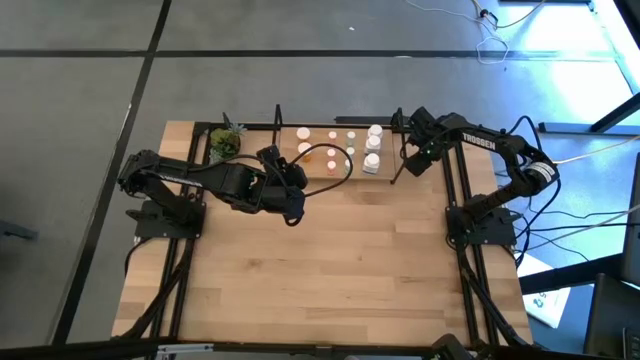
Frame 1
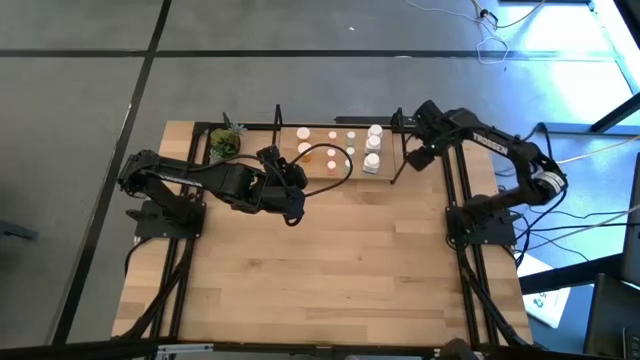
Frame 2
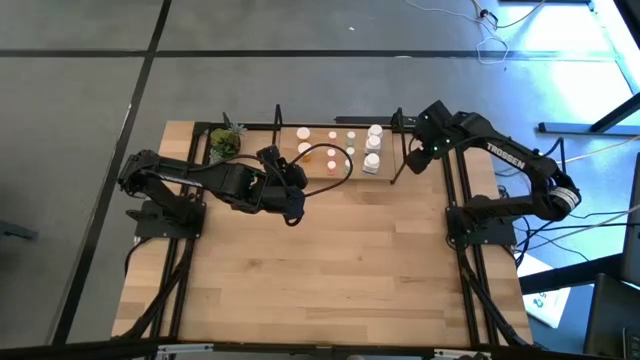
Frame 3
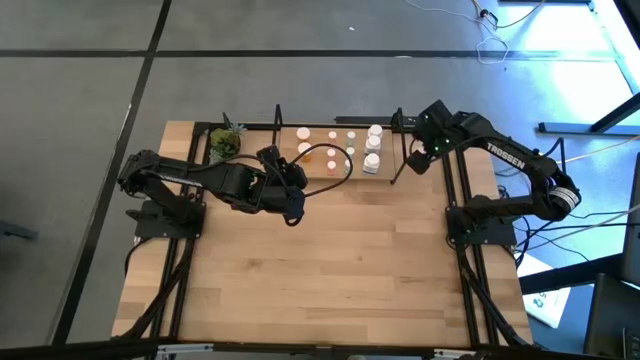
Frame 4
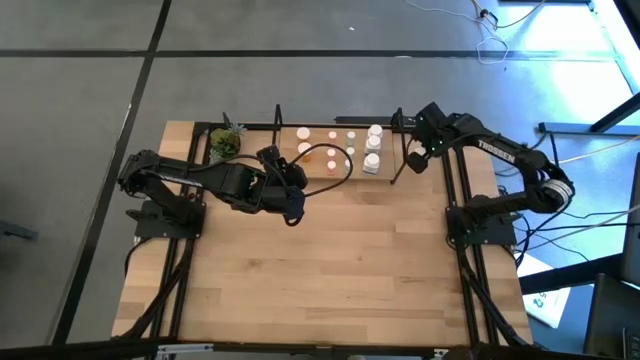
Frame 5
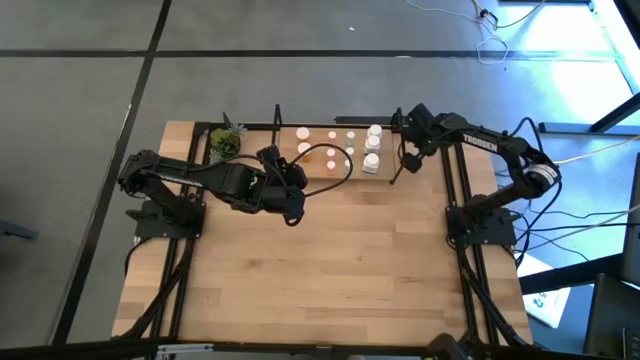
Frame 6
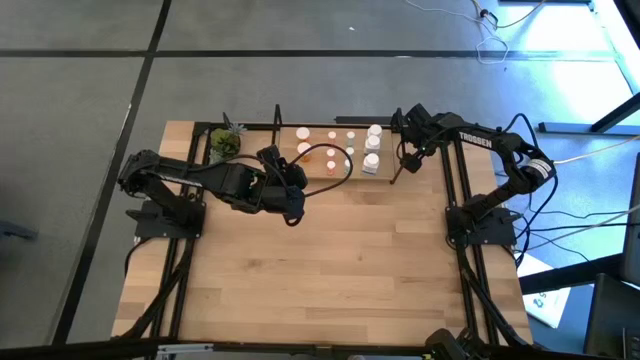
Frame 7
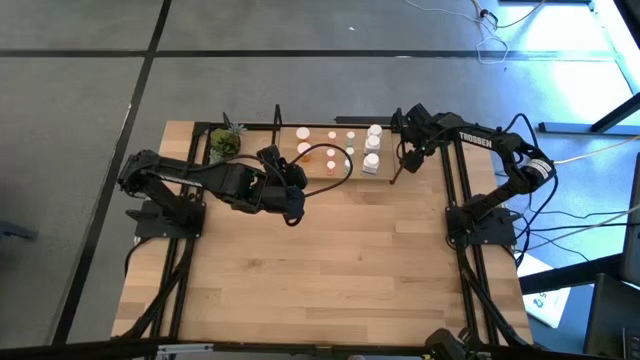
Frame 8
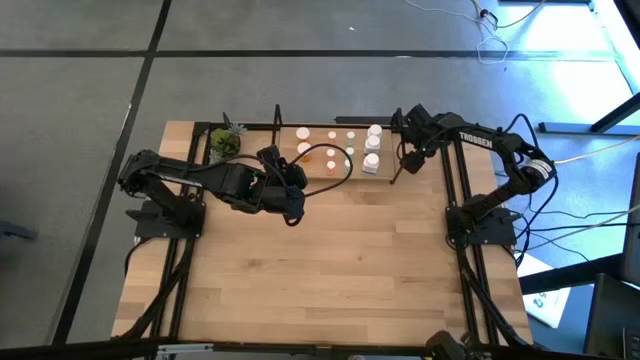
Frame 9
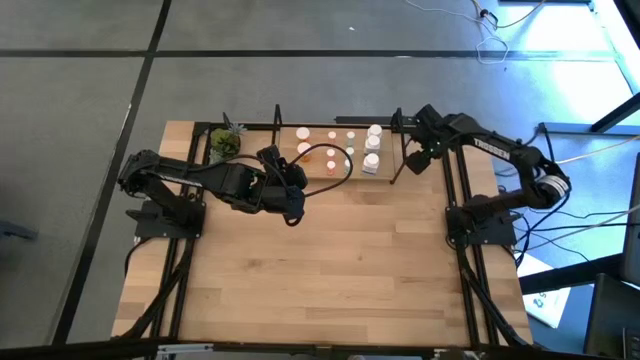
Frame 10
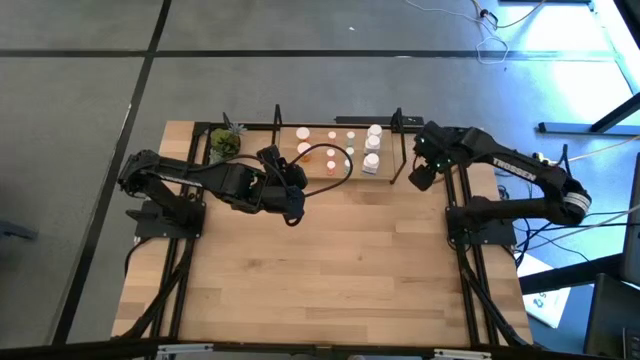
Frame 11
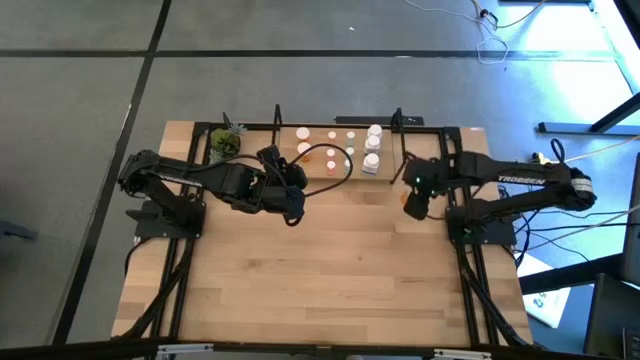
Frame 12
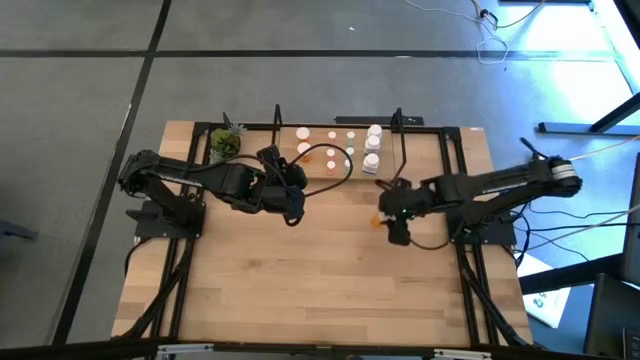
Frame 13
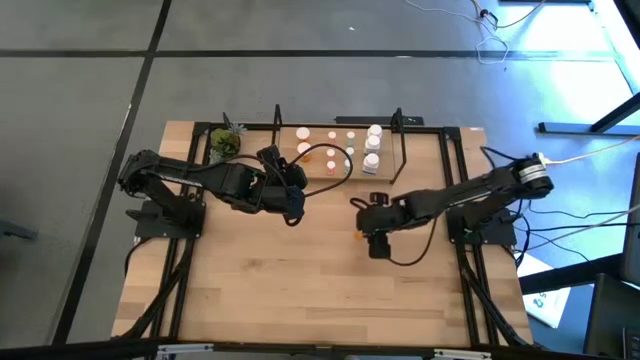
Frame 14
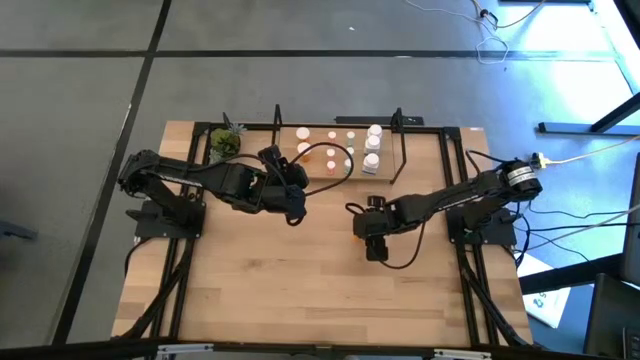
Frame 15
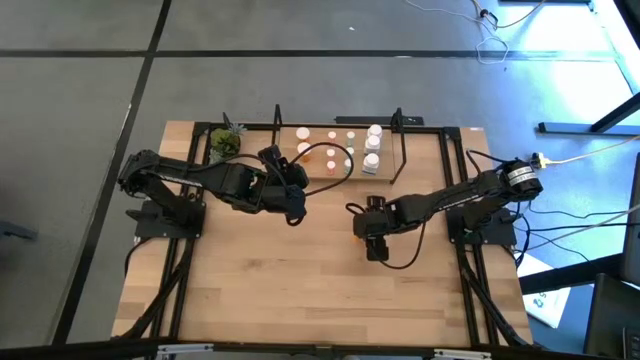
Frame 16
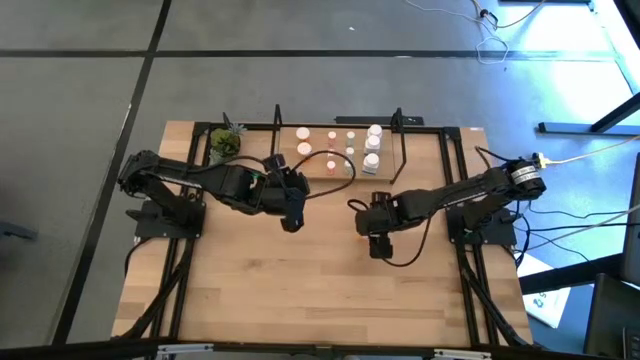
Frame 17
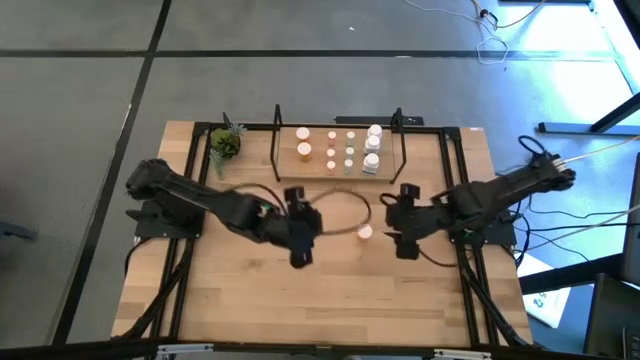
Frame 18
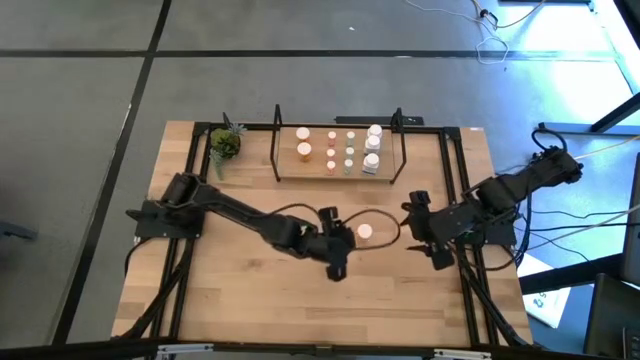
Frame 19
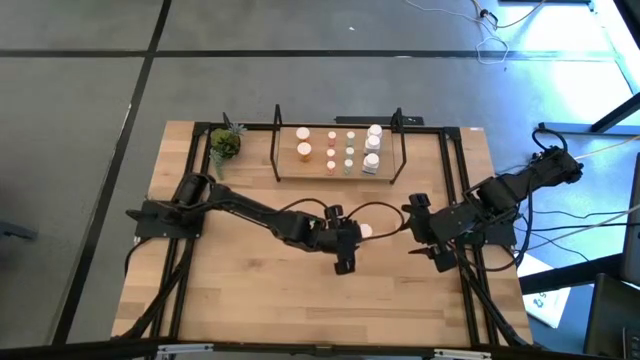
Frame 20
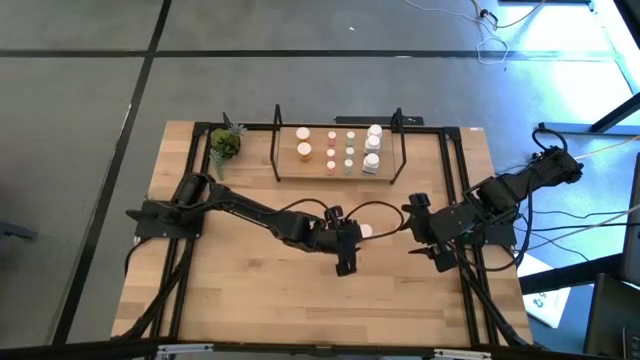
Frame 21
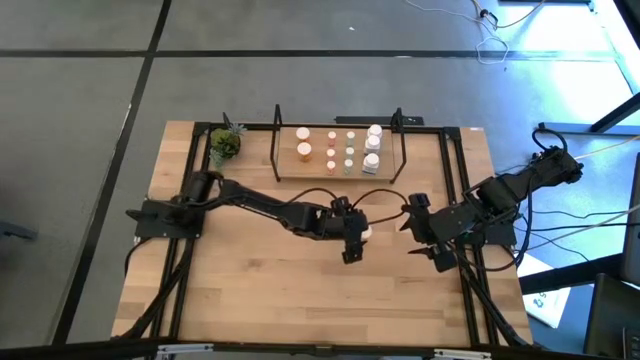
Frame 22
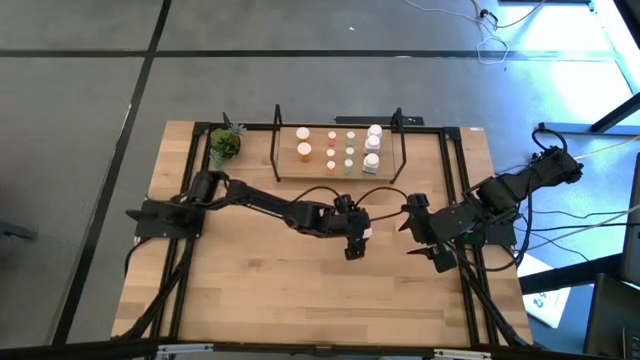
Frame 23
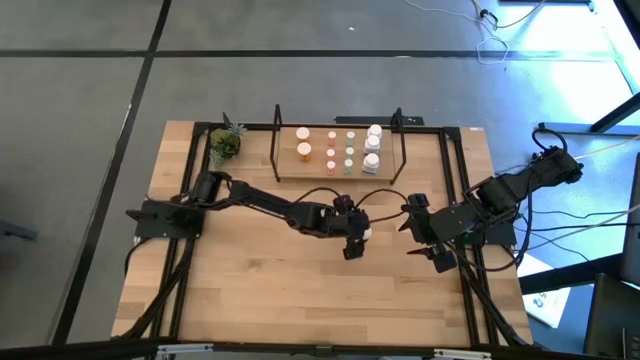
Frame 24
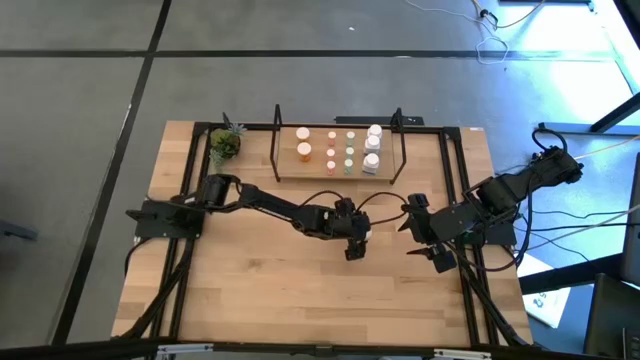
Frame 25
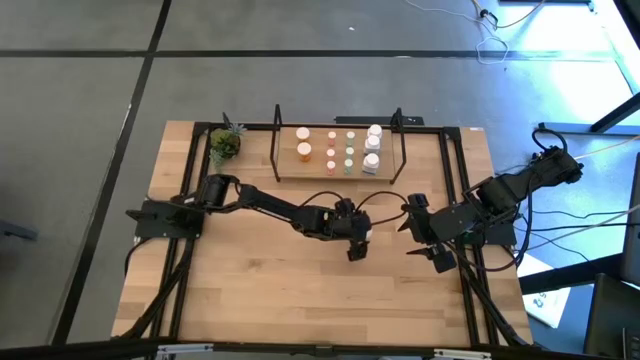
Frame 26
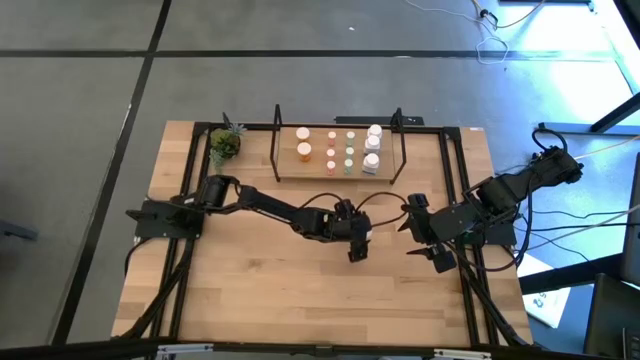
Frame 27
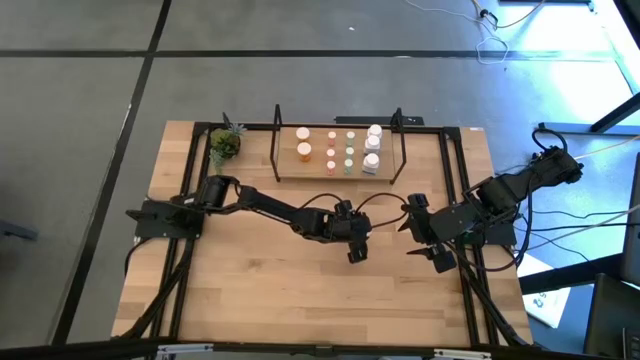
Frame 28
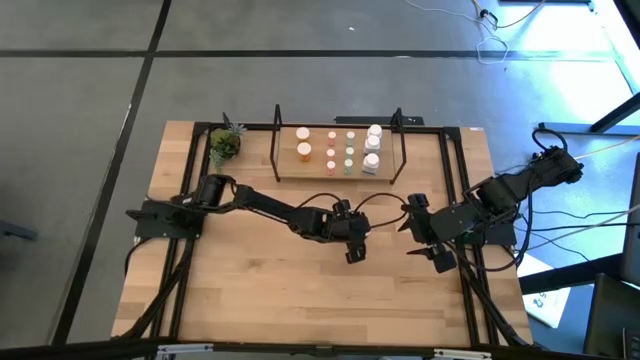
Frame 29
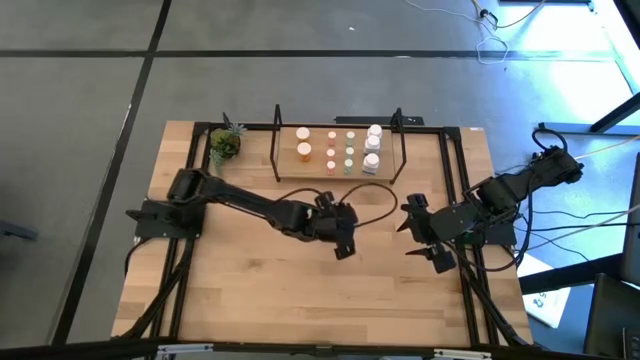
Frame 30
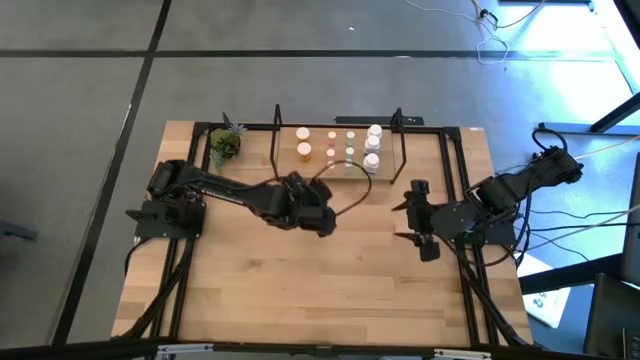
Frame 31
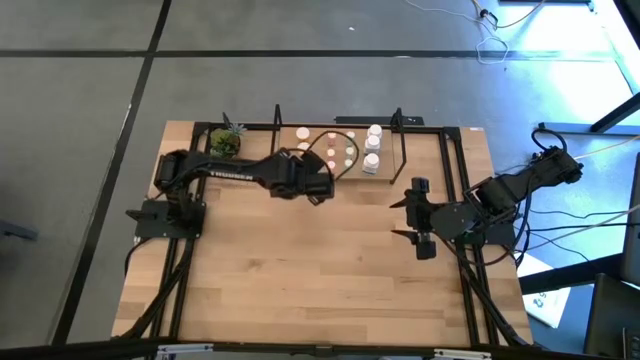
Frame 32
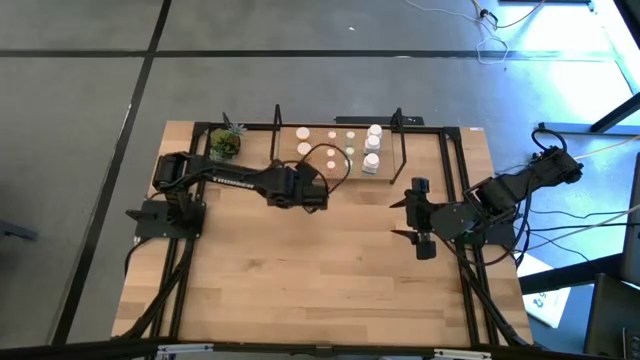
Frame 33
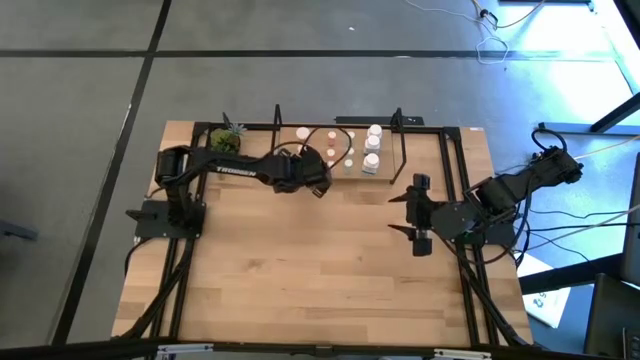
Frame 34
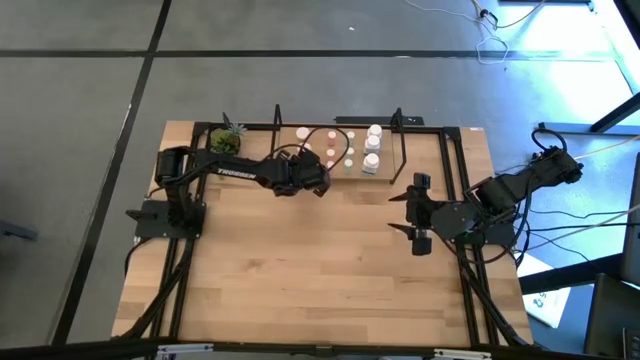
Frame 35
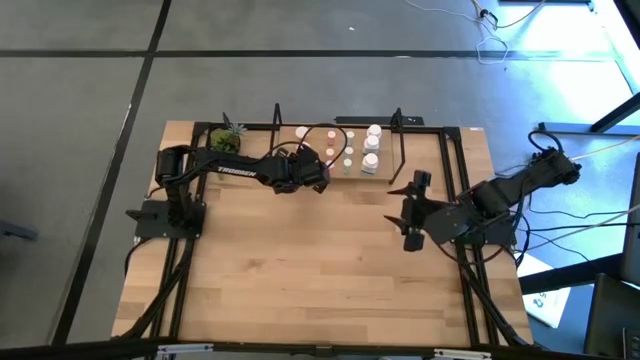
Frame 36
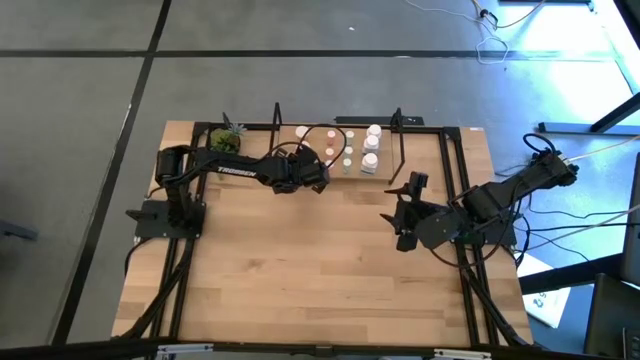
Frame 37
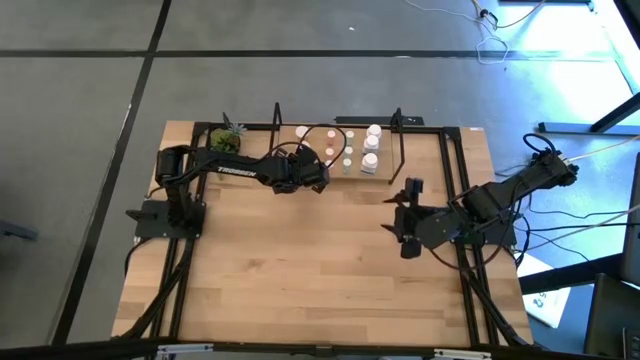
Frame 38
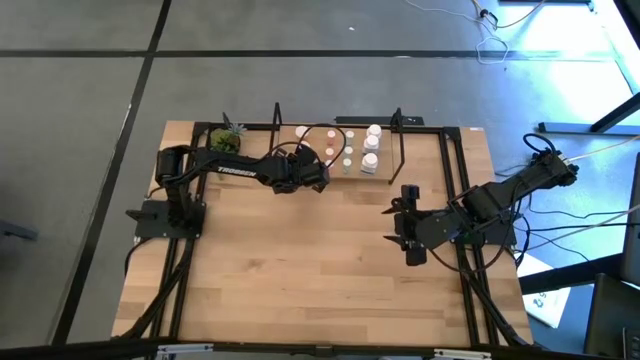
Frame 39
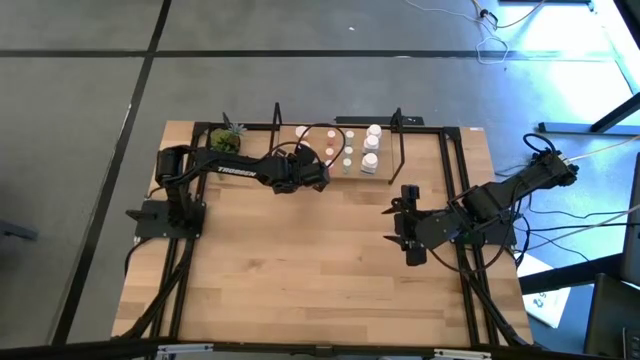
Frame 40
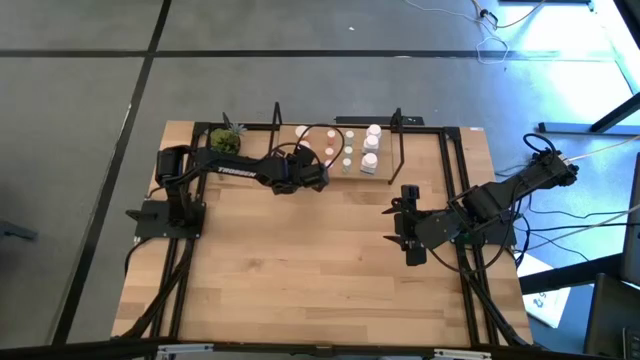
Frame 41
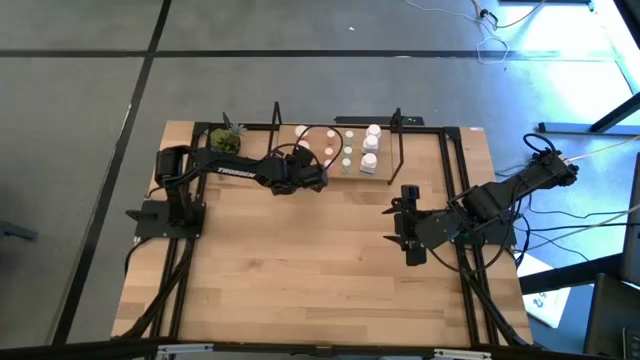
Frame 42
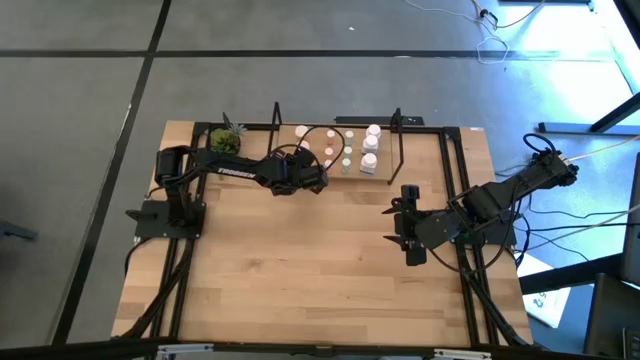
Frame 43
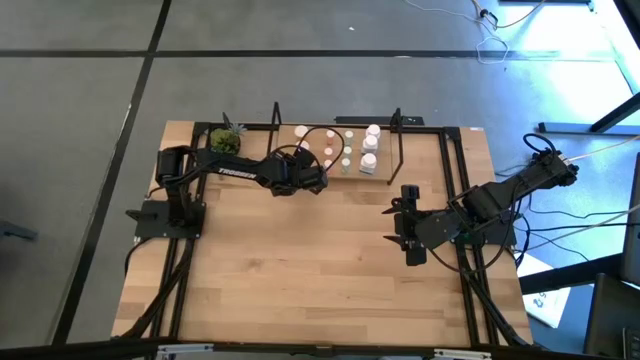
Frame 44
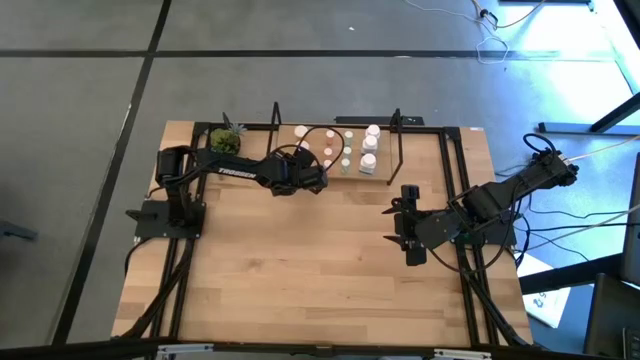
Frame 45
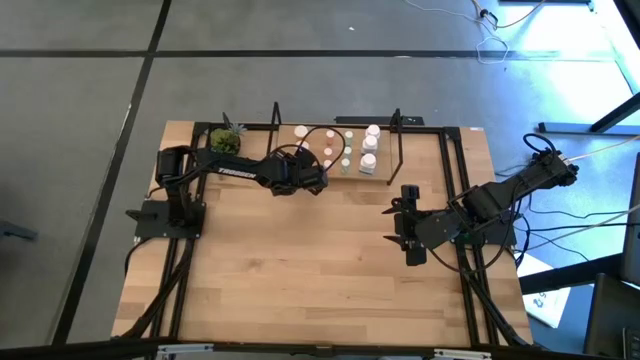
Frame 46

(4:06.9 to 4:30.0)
Task: Pick and place medicine bottles onto shelf by color
Put the orange pill bottle on the shelf aligned with the orange pill bottles
